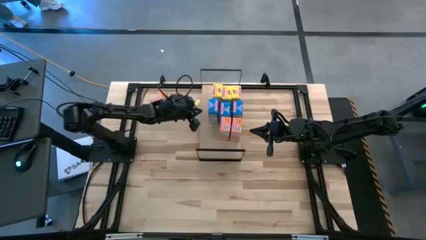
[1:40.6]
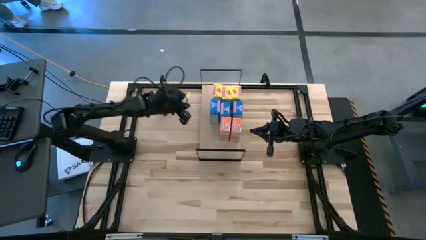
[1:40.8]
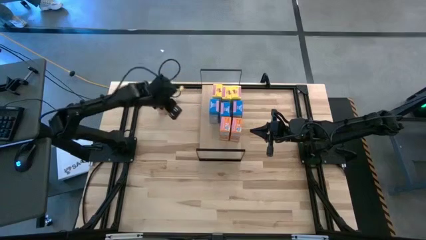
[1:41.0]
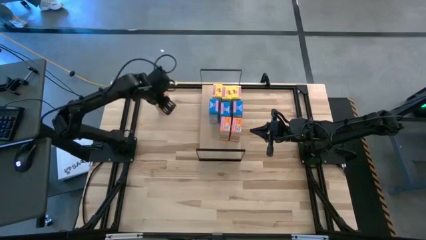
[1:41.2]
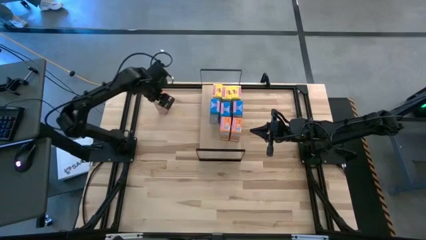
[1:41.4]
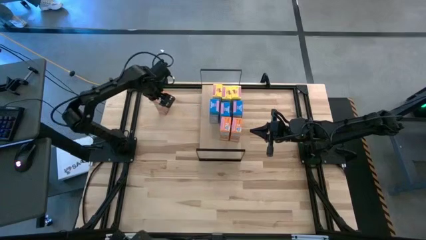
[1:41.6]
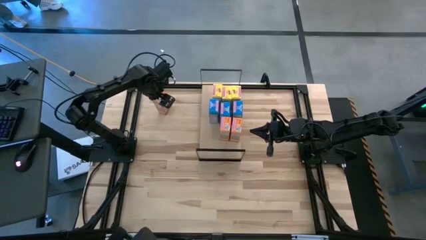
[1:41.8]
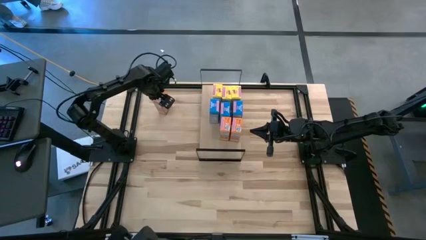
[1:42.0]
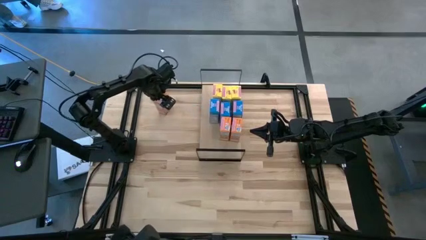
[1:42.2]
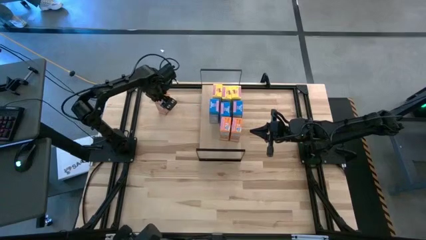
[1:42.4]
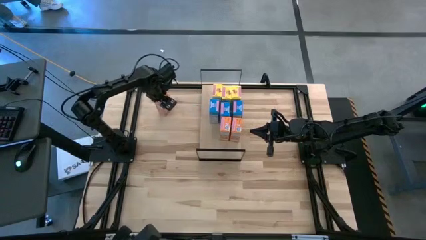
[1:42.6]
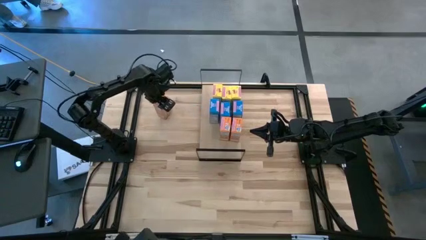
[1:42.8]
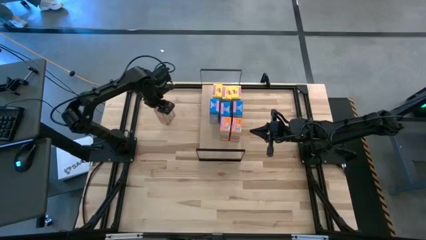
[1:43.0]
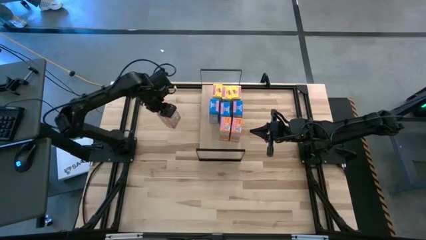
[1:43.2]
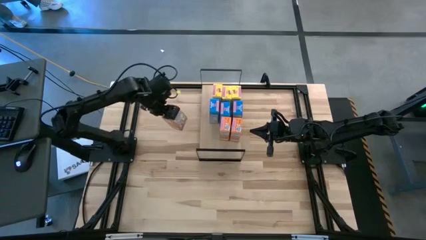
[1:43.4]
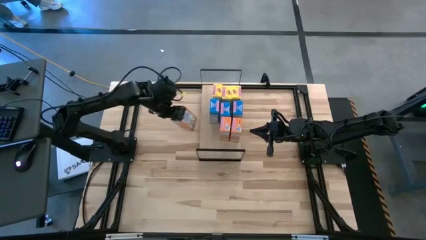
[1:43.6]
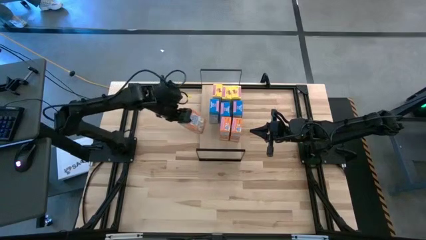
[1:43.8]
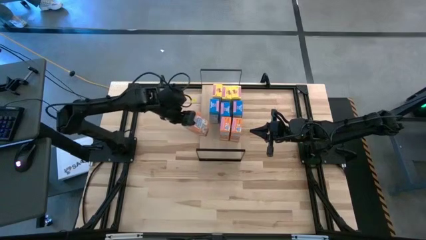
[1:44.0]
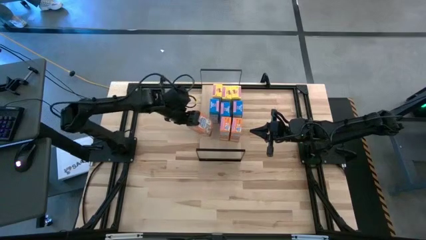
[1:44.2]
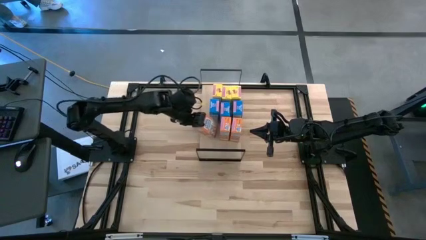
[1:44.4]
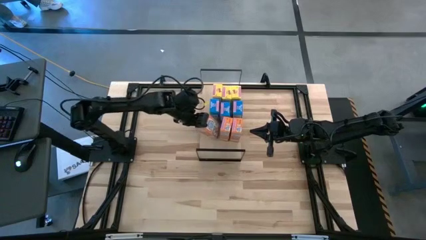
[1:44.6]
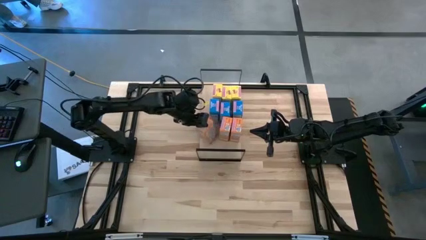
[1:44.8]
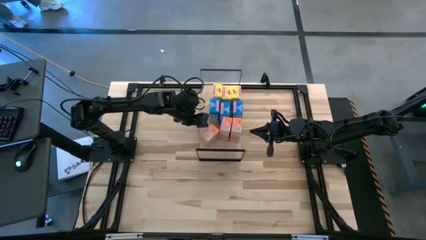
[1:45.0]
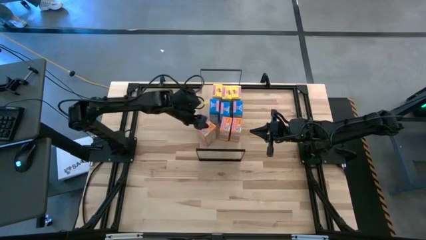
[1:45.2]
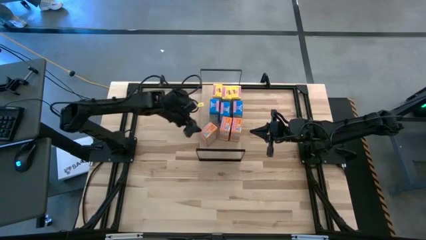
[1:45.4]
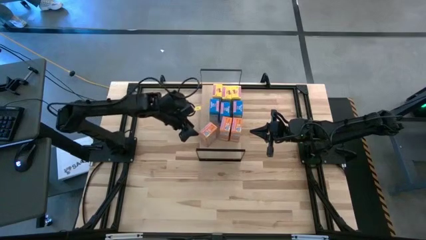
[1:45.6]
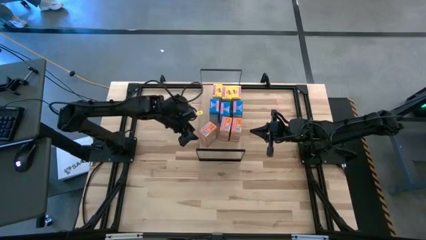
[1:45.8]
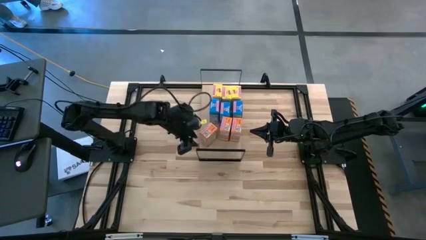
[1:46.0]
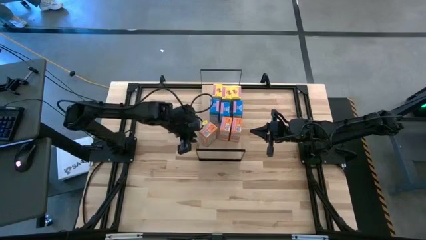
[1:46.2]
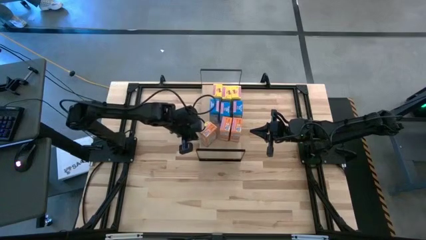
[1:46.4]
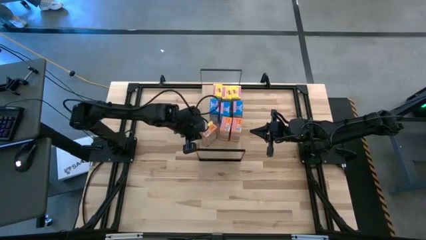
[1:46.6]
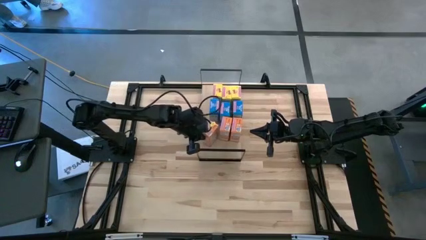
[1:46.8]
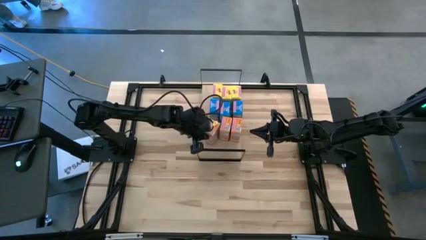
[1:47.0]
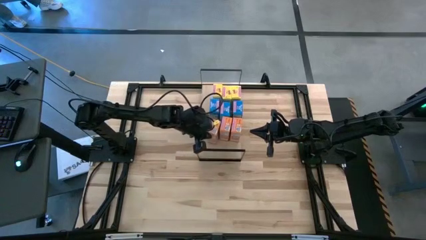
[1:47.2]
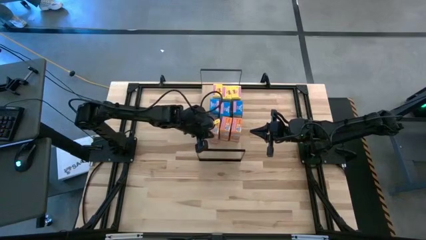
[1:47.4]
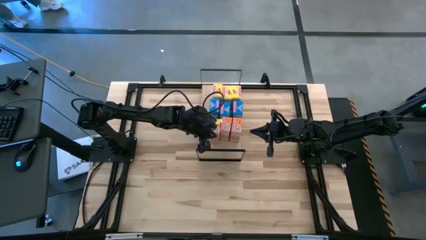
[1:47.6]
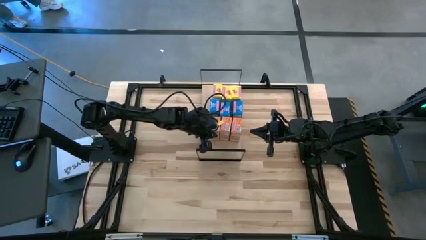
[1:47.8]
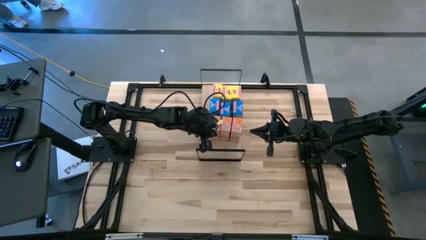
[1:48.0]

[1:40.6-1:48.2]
Task: Stack cereal on shelf
Put the orange cereal box on the shelf aligned with the other orange cereal boxes on the shelf

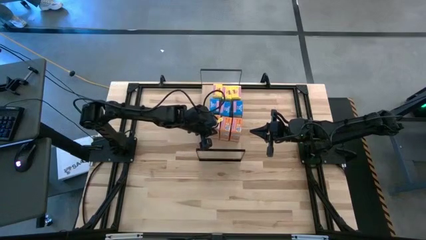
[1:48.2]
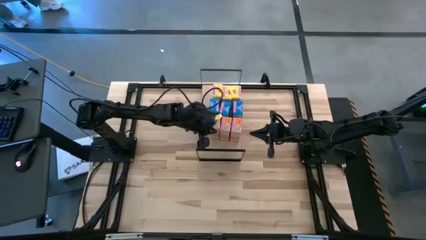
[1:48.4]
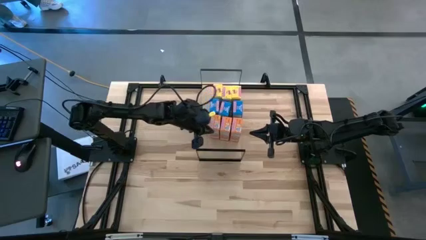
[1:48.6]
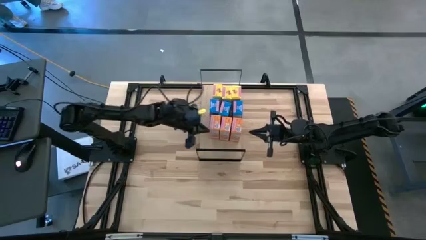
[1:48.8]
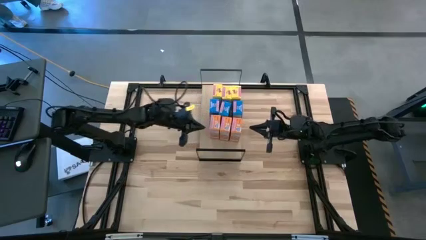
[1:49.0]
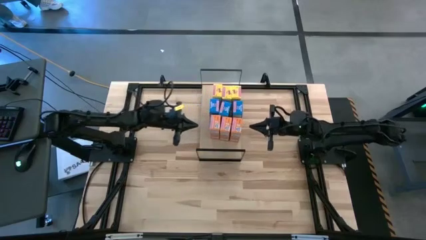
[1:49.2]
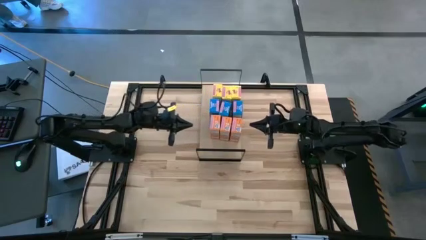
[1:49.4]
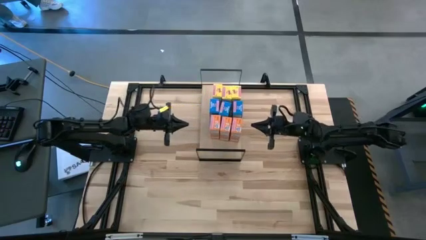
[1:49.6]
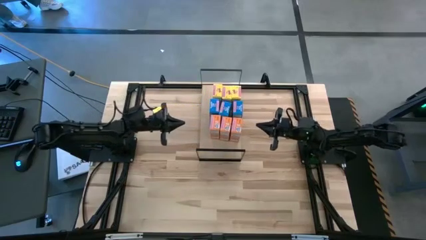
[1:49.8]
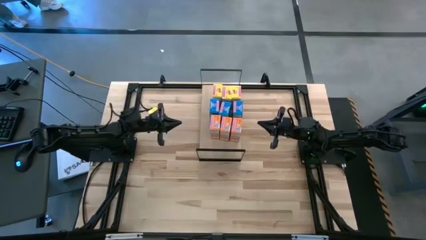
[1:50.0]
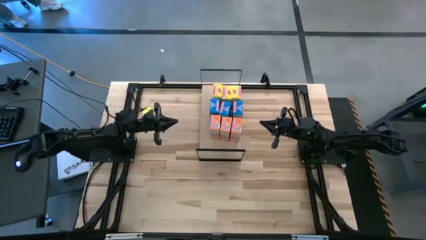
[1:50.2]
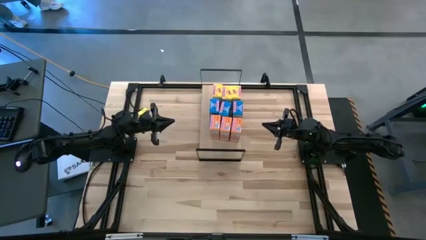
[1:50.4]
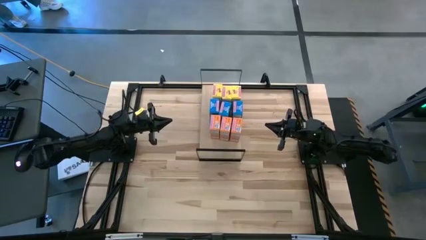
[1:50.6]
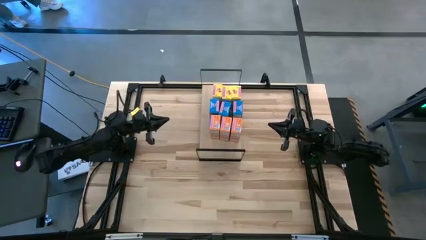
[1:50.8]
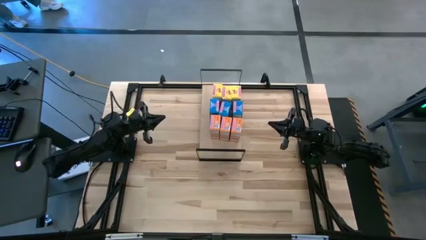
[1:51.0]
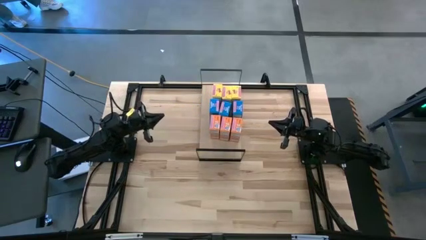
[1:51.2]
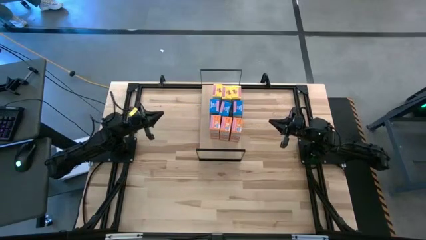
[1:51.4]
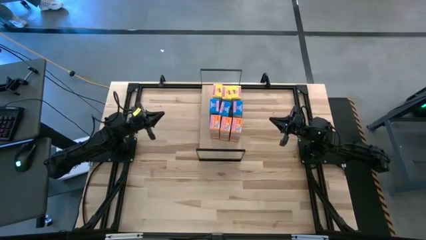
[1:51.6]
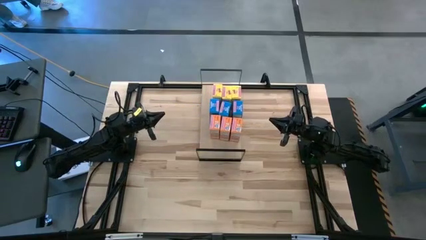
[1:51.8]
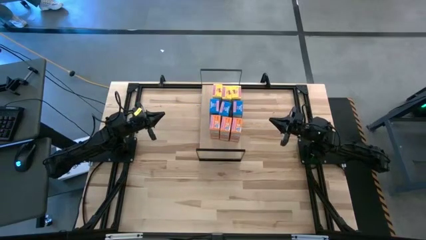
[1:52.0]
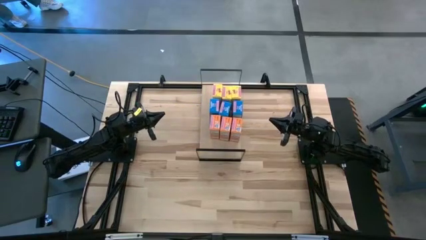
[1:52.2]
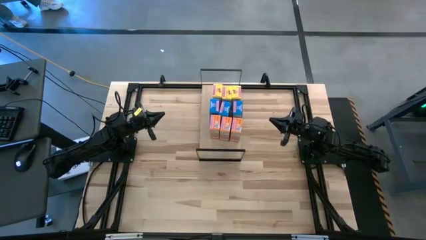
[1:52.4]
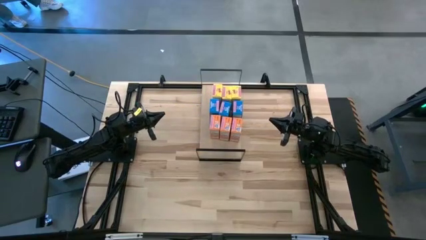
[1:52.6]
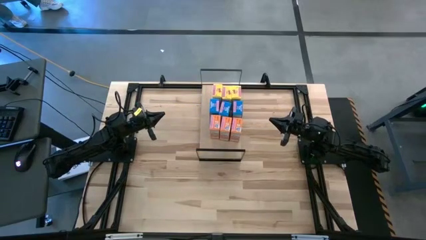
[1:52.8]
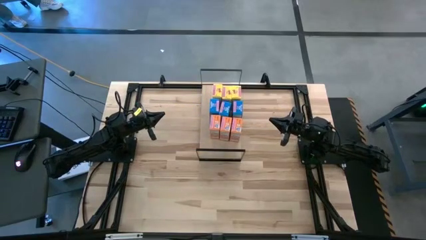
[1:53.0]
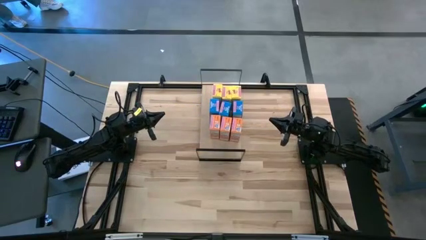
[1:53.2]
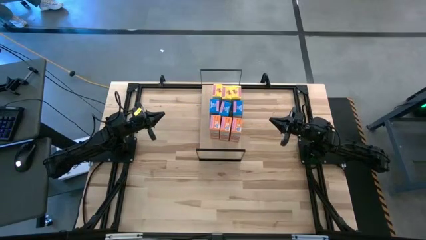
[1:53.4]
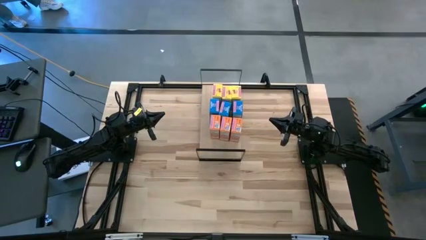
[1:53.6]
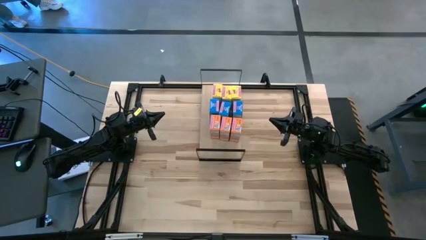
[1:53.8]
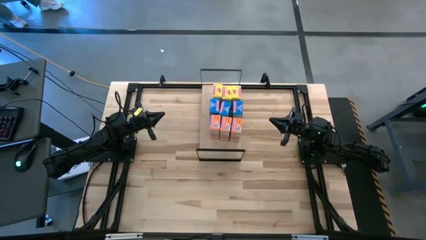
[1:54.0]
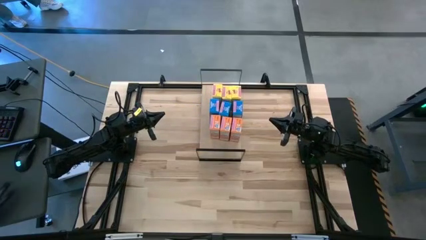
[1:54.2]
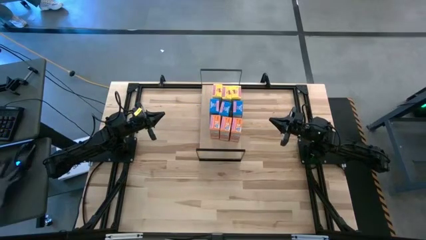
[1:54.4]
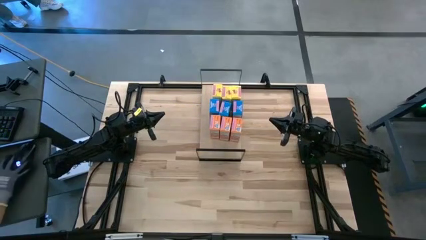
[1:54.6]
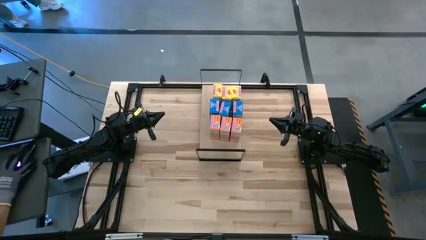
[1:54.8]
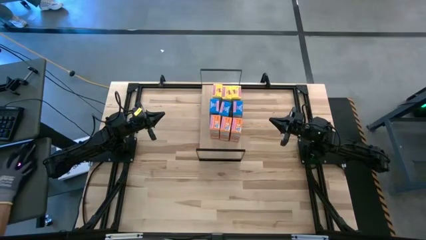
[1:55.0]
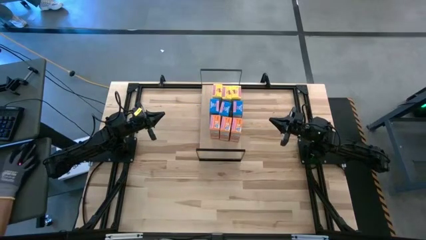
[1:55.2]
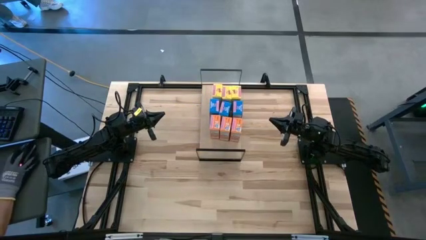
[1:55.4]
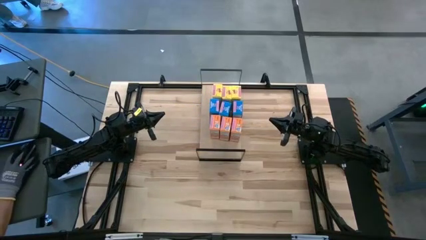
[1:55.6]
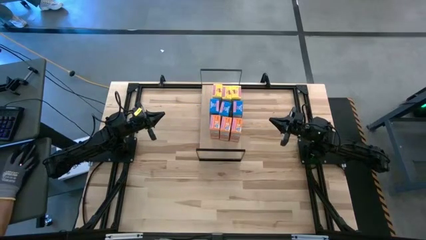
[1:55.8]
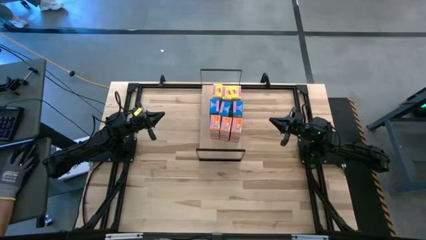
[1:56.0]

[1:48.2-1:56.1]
Return to Home Position

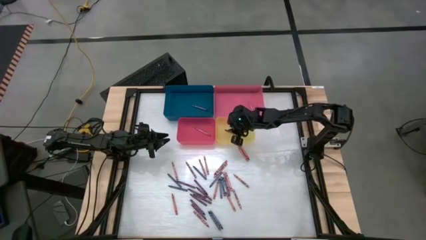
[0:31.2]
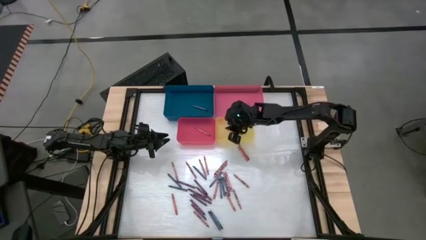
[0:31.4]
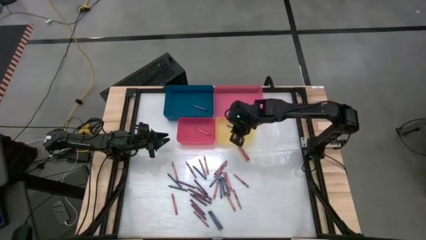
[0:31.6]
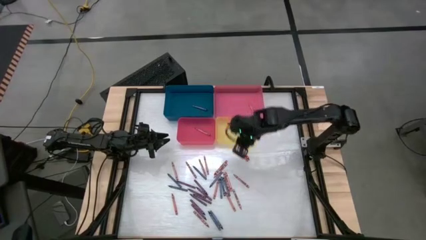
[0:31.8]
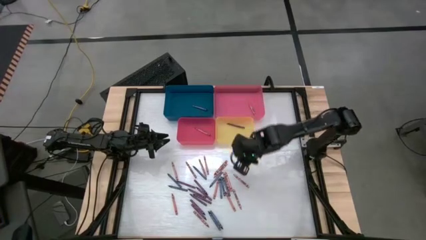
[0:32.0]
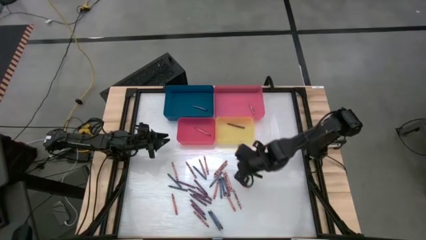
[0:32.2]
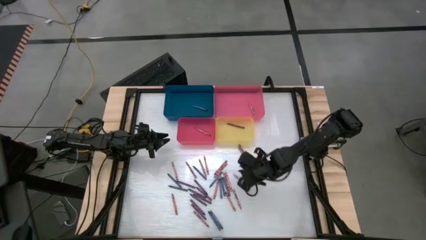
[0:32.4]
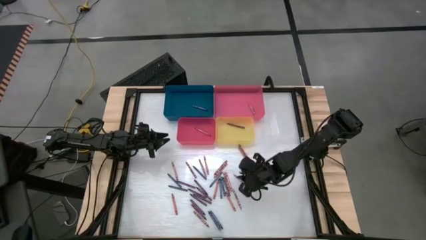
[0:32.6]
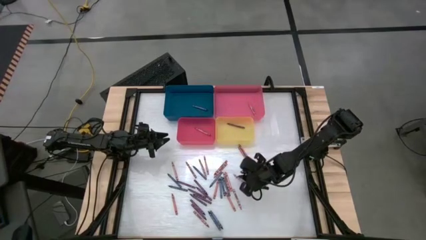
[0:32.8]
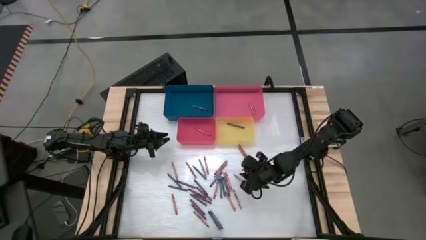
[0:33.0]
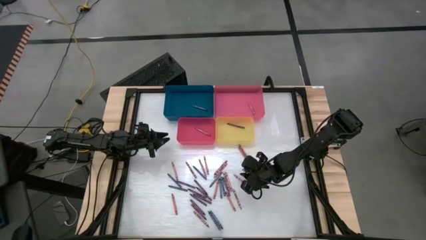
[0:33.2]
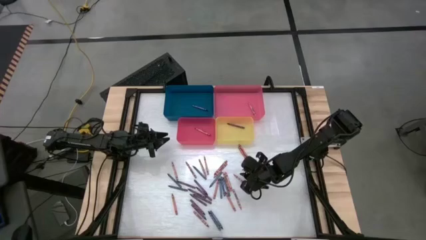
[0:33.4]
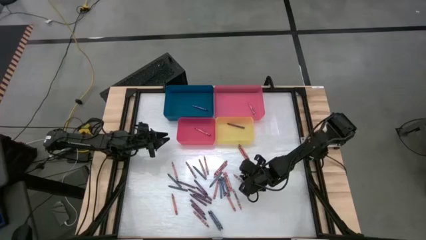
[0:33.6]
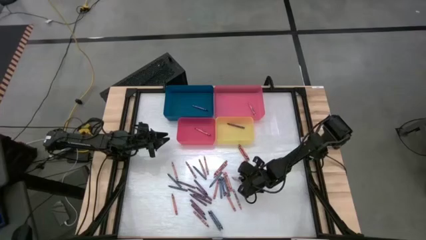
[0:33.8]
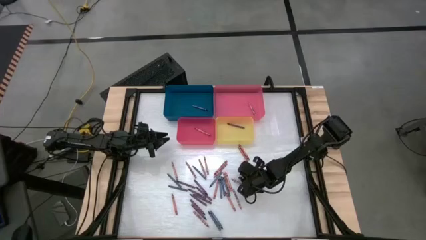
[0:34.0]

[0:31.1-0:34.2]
Task: Sort crayons
Put the pink crayon into the pink bin
